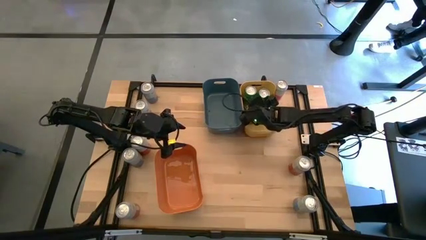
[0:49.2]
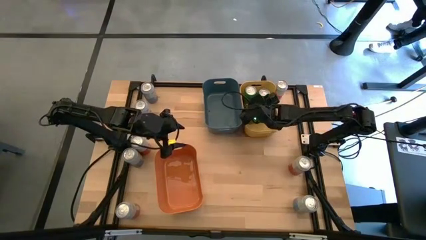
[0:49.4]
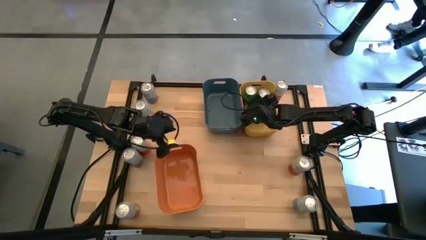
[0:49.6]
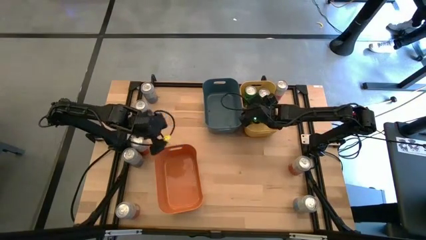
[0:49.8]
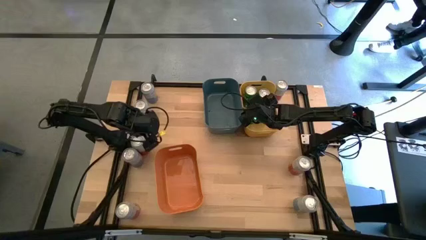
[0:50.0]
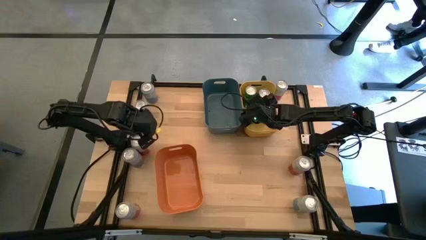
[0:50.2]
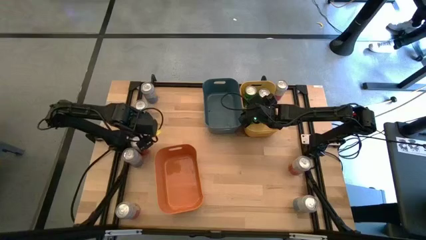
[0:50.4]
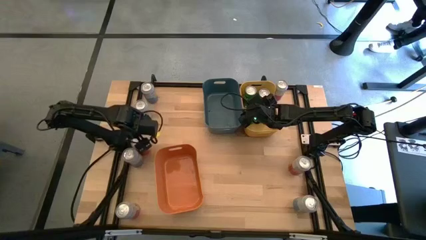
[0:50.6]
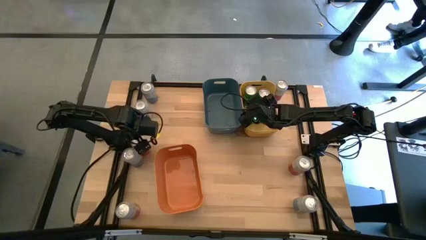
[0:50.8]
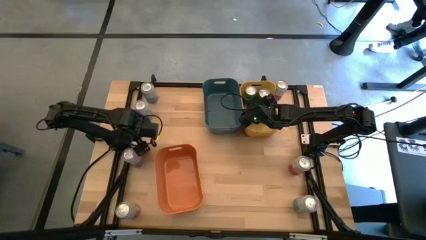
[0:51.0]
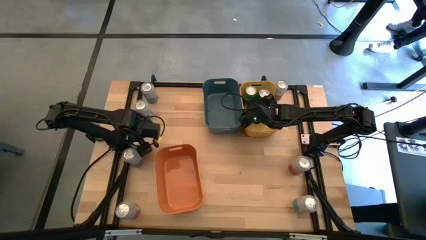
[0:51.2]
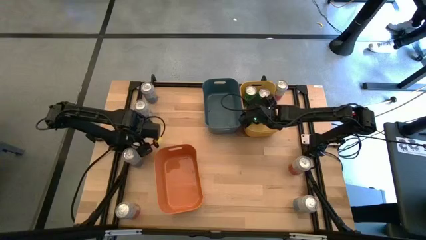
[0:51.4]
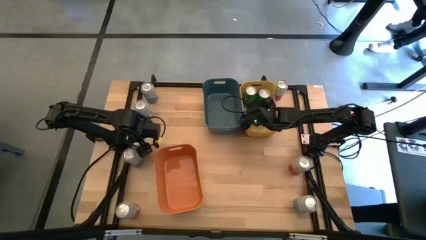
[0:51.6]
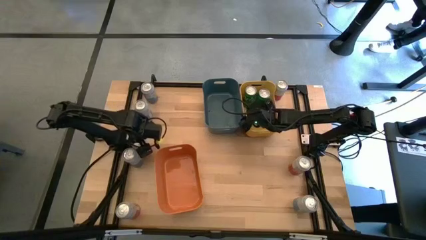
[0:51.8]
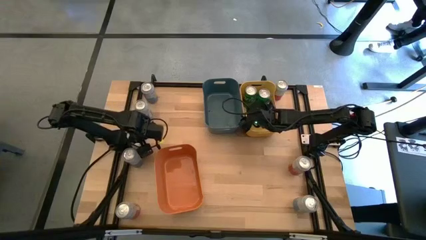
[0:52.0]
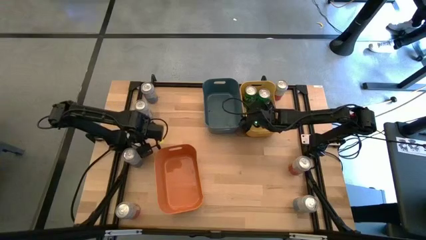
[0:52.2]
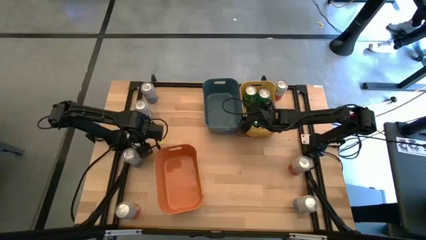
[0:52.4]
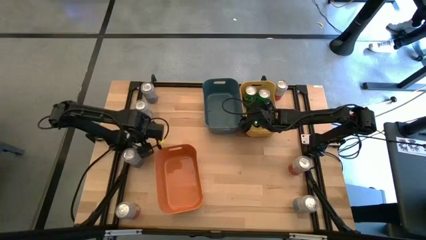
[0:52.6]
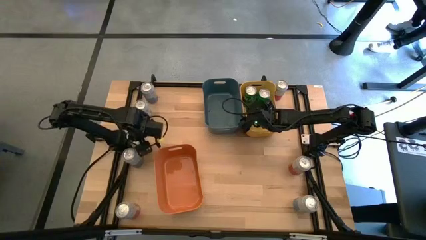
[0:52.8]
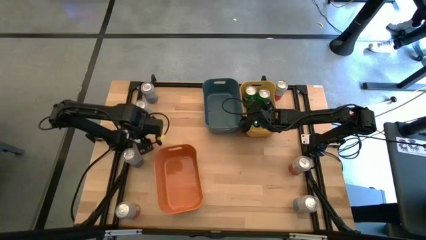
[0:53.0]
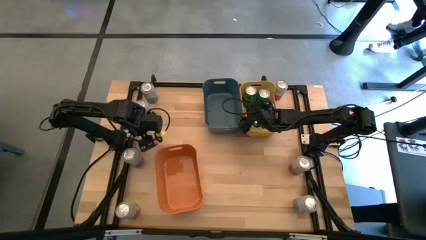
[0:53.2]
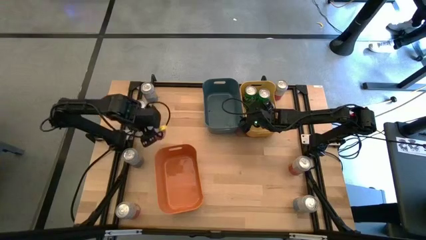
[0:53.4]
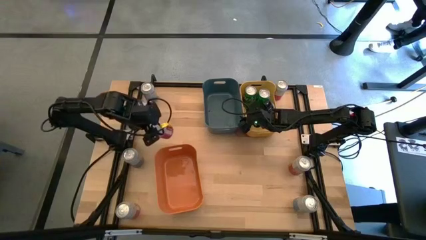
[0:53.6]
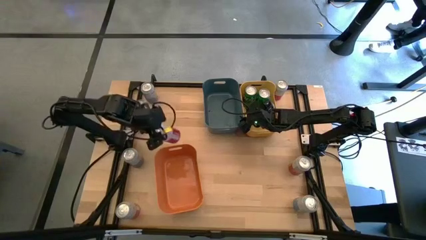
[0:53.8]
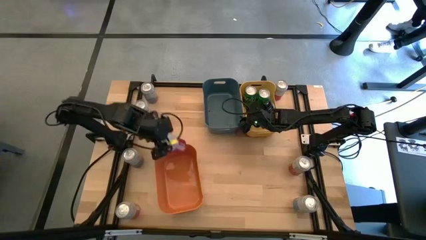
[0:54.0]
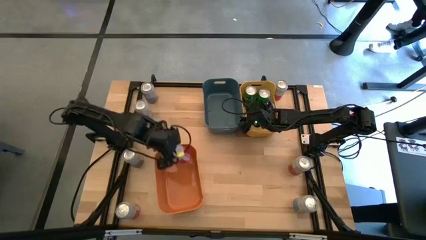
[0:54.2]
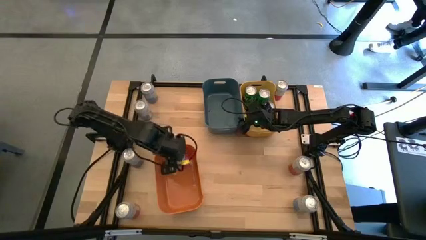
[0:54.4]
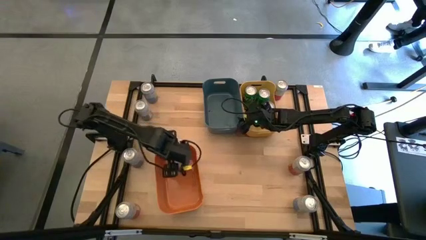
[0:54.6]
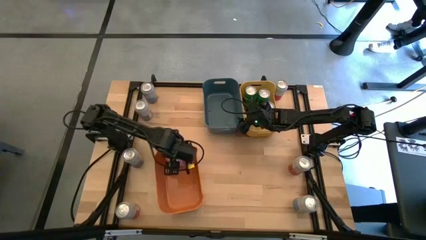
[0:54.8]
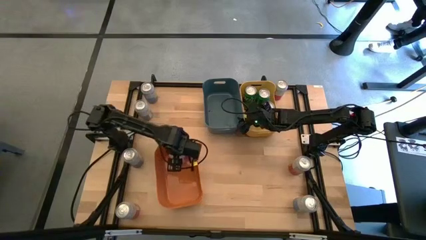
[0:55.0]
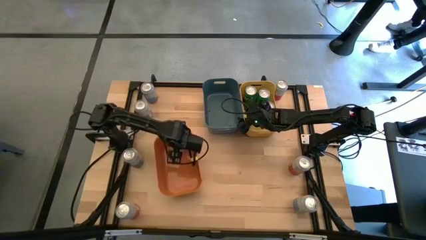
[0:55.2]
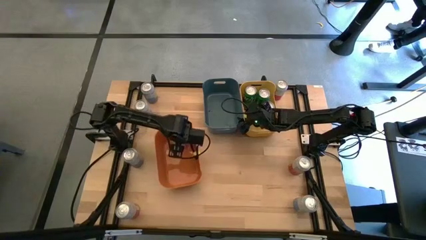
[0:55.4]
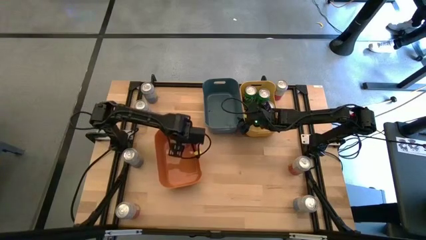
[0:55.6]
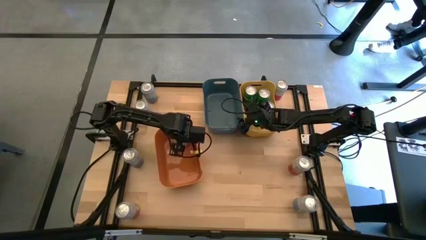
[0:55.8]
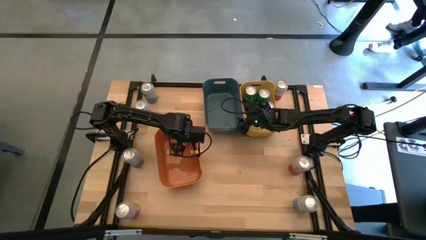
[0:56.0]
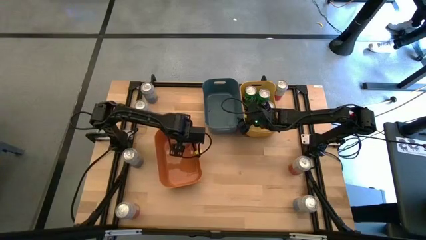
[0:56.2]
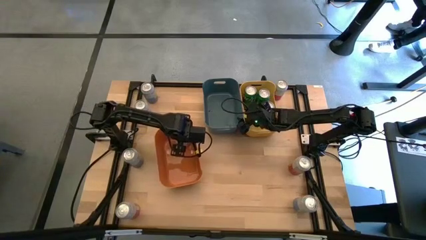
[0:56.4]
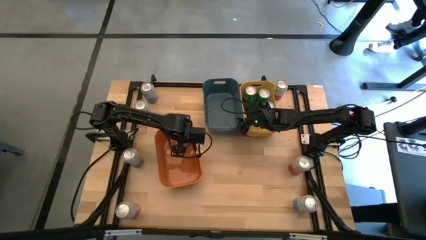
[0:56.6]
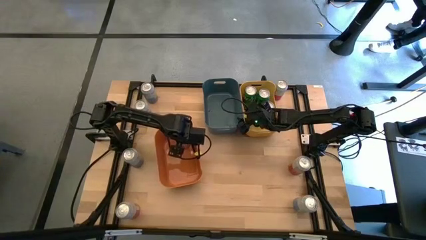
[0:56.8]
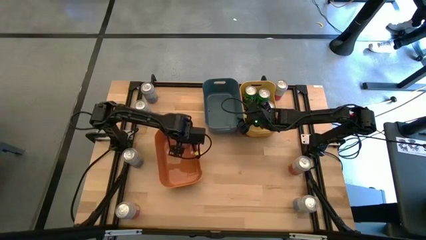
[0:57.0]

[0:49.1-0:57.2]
Task: Sort soda cans
Put the pink-white soda can into the orange bin

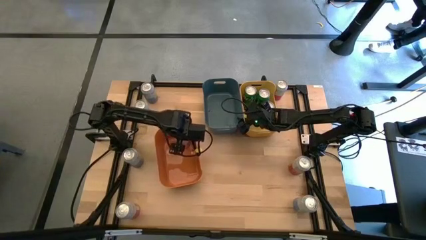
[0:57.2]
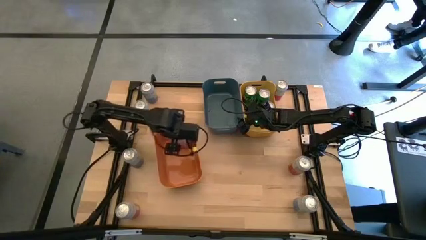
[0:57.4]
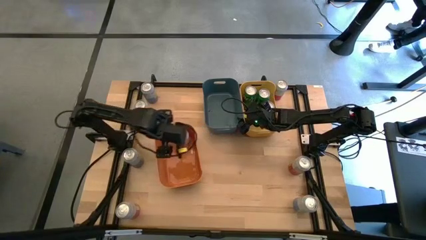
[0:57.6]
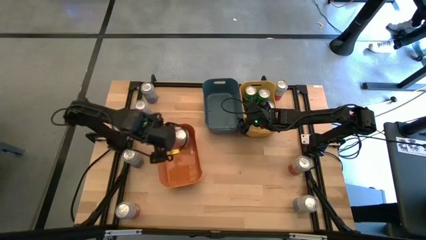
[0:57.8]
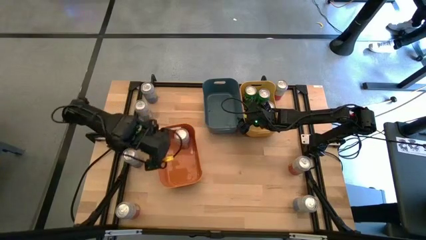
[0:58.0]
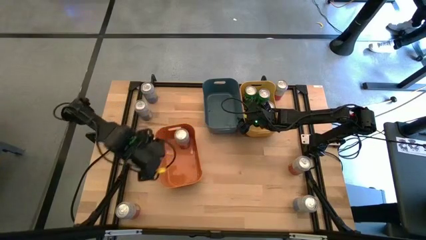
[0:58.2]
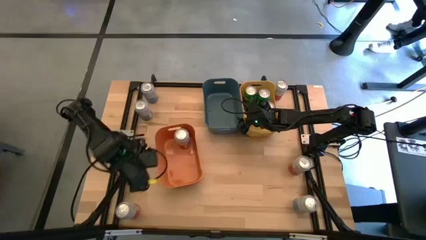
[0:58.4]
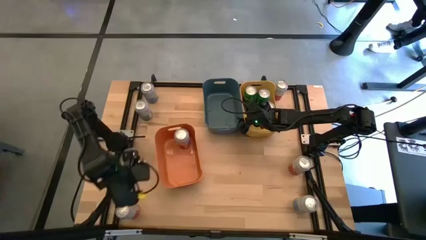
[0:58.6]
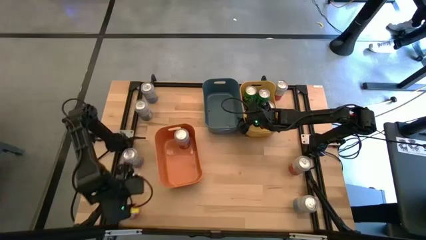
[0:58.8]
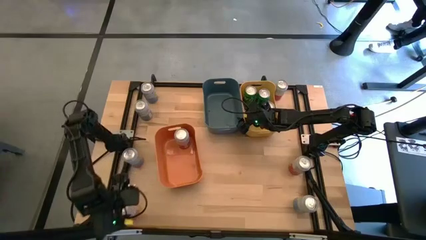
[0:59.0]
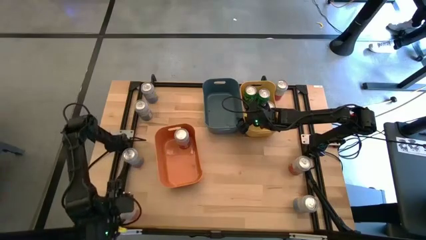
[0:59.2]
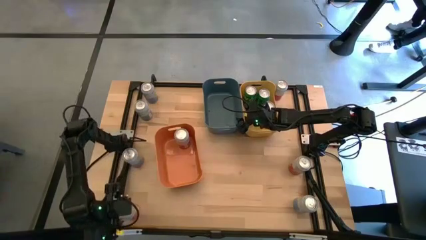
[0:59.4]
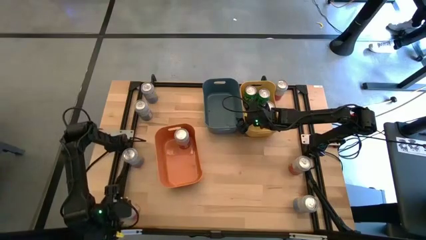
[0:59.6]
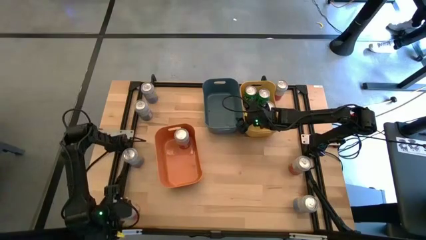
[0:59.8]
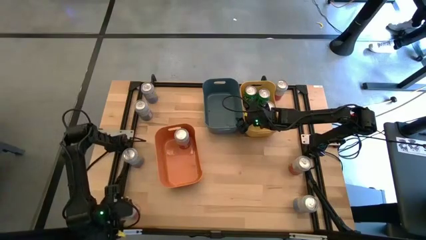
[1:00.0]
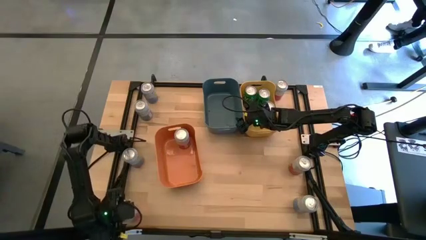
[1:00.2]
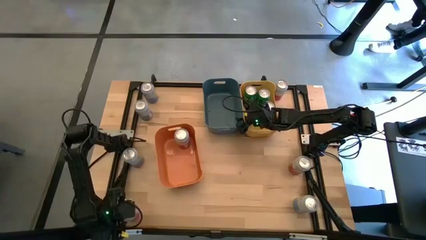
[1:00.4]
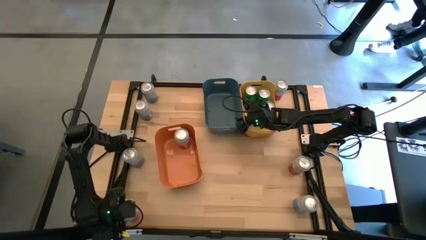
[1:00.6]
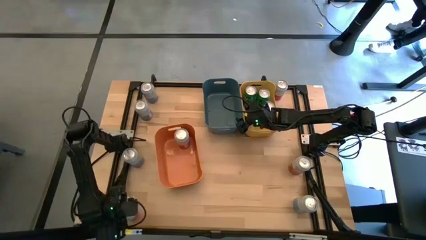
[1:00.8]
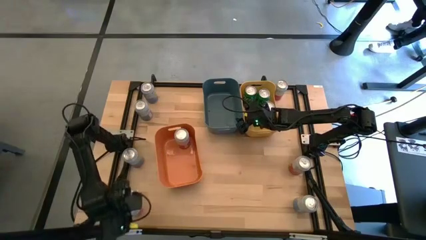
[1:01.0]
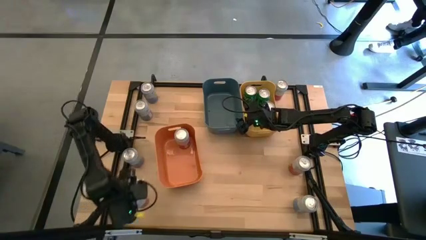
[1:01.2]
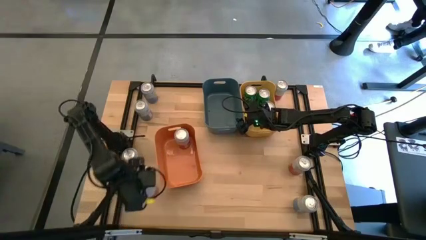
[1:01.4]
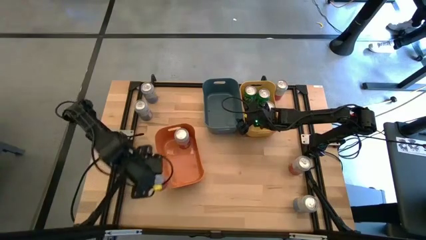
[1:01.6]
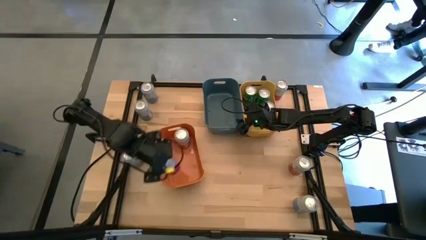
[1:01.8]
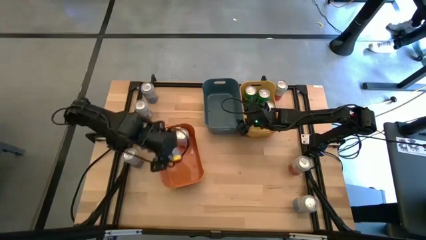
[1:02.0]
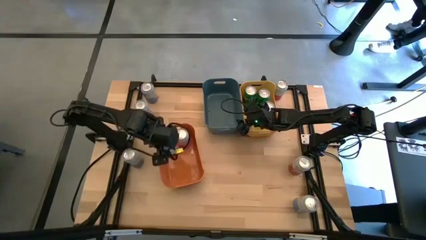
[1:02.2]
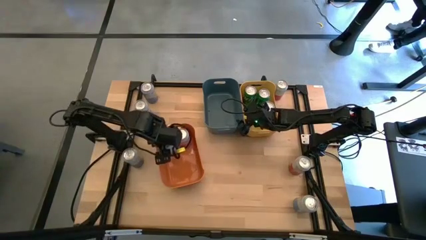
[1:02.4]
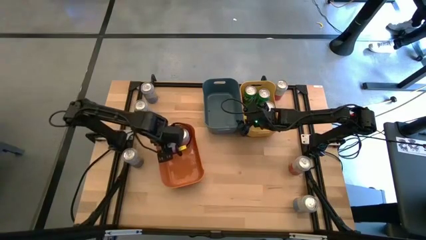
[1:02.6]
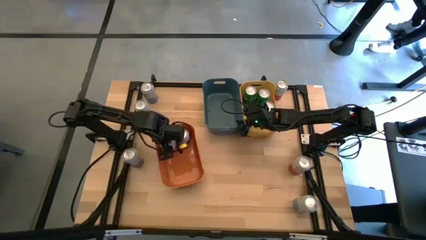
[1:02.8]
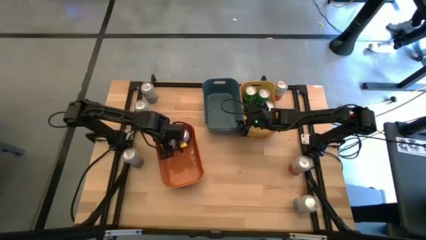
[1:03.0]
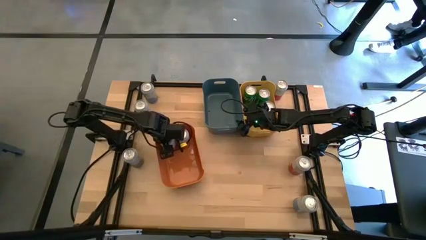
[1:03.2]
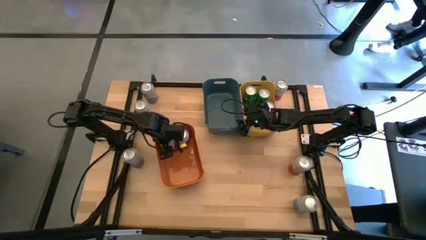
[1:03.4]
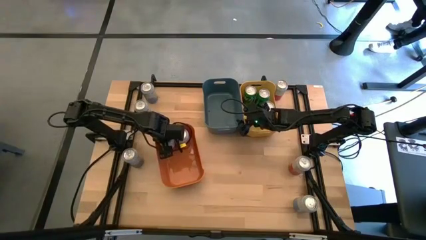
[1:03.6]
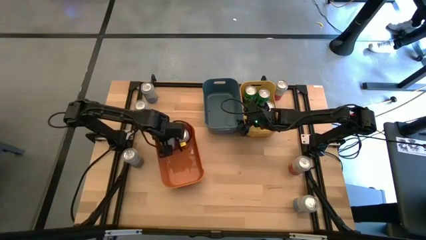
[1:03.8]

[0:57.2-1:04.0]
Put the pink-white soda can into the orange bin
